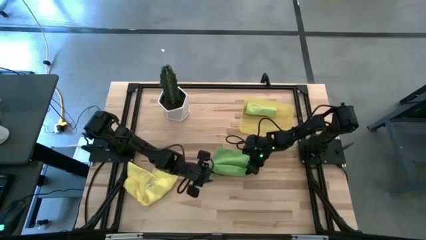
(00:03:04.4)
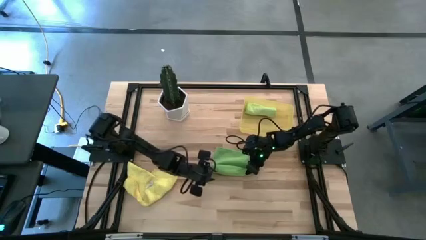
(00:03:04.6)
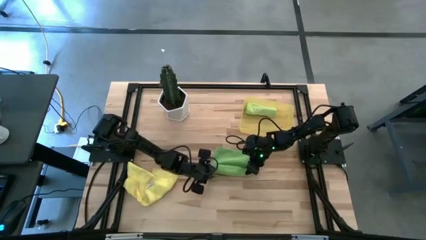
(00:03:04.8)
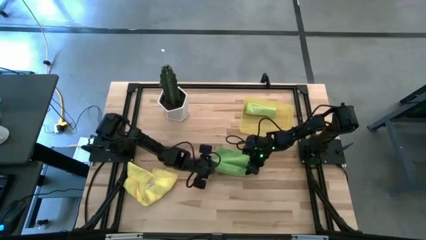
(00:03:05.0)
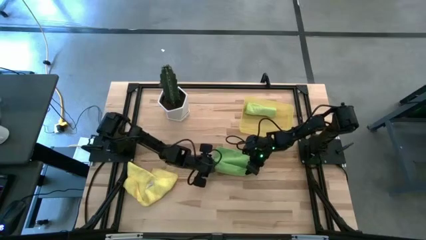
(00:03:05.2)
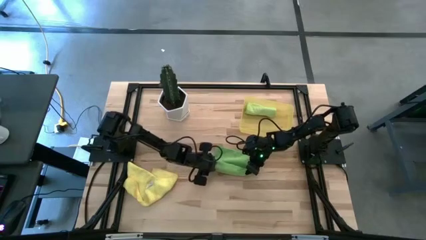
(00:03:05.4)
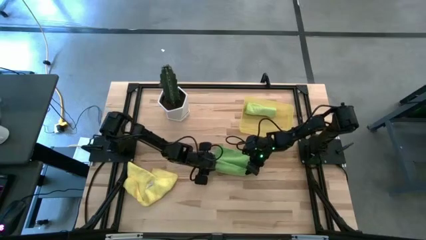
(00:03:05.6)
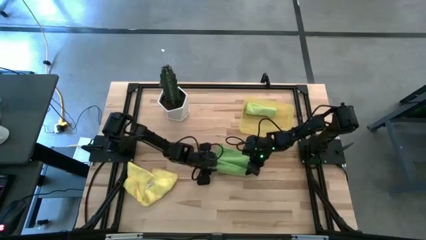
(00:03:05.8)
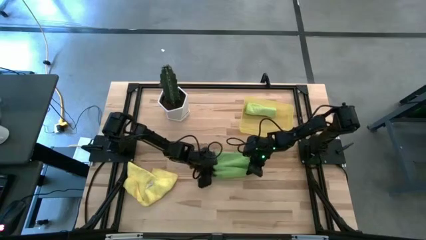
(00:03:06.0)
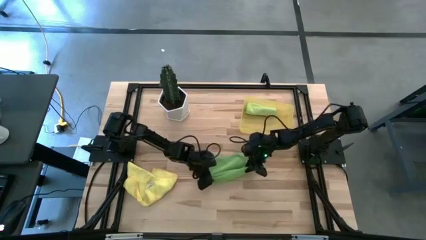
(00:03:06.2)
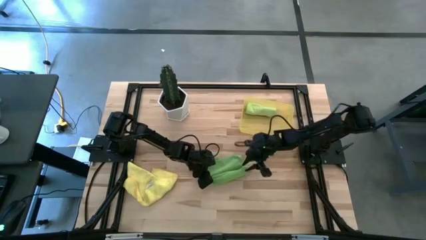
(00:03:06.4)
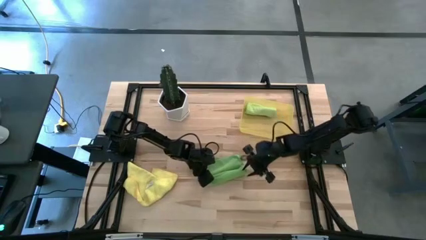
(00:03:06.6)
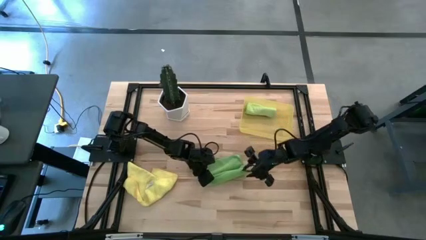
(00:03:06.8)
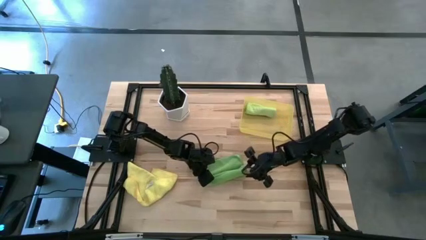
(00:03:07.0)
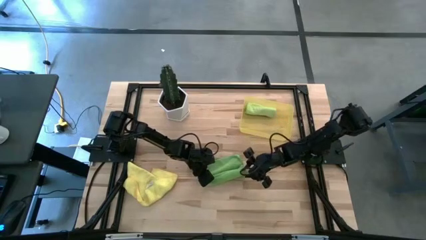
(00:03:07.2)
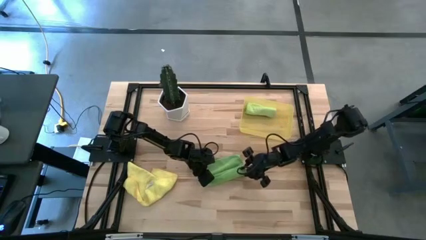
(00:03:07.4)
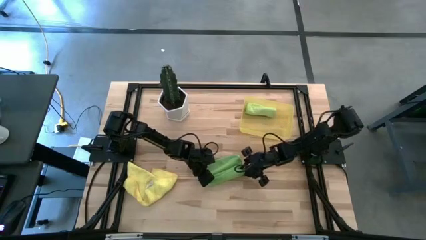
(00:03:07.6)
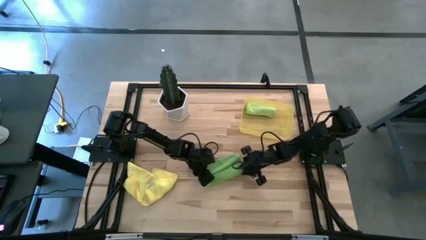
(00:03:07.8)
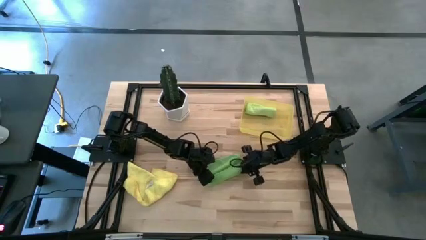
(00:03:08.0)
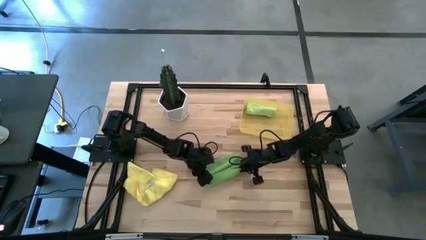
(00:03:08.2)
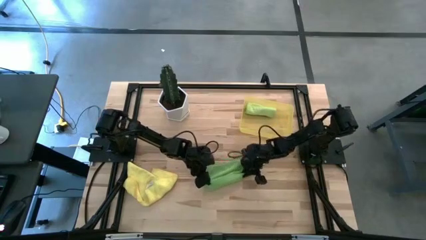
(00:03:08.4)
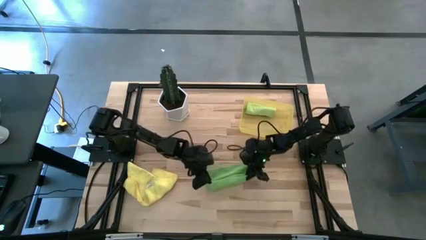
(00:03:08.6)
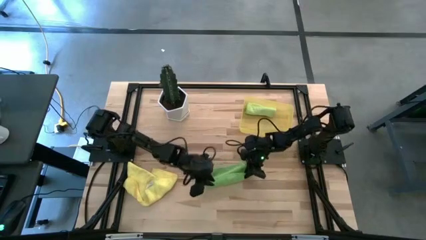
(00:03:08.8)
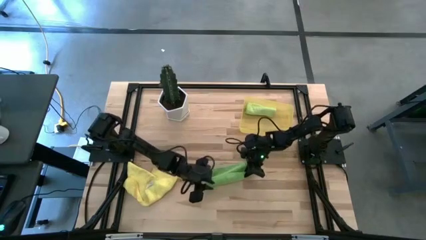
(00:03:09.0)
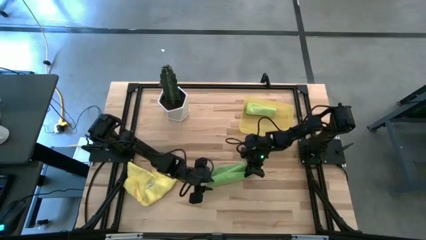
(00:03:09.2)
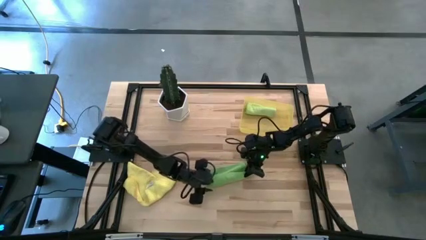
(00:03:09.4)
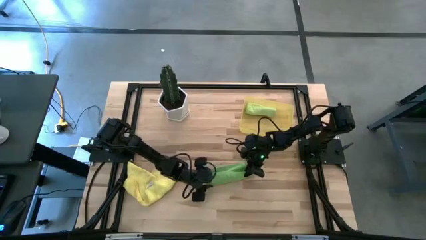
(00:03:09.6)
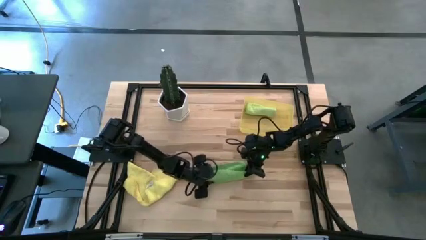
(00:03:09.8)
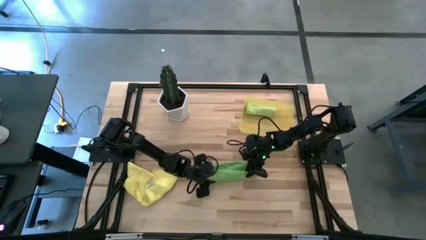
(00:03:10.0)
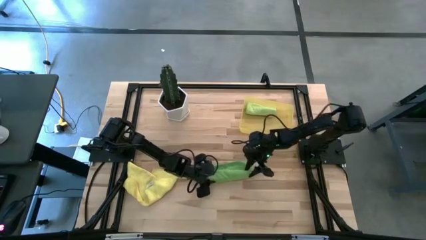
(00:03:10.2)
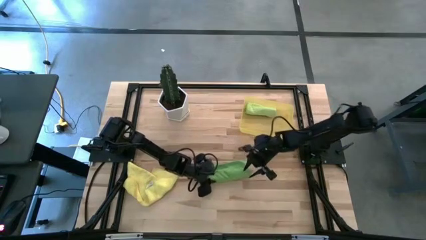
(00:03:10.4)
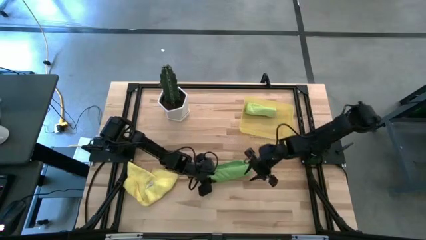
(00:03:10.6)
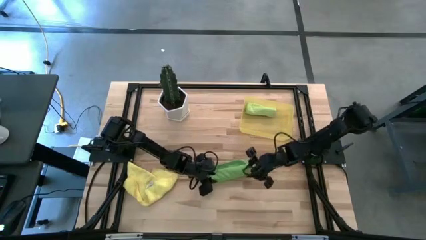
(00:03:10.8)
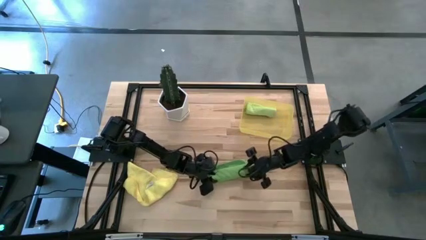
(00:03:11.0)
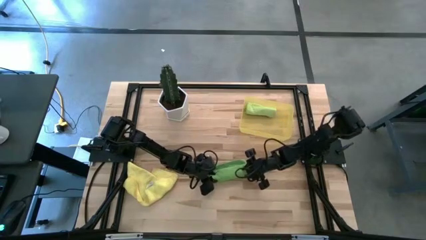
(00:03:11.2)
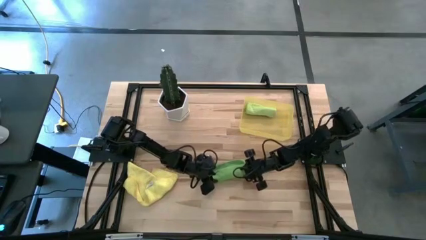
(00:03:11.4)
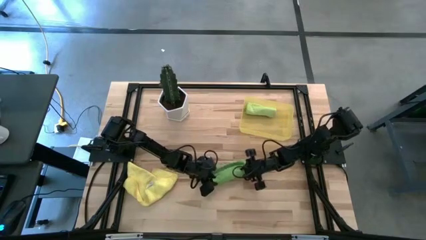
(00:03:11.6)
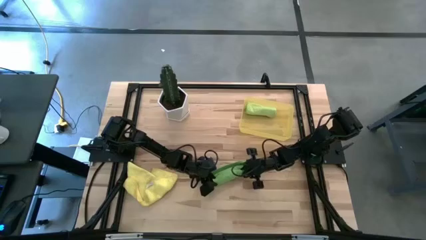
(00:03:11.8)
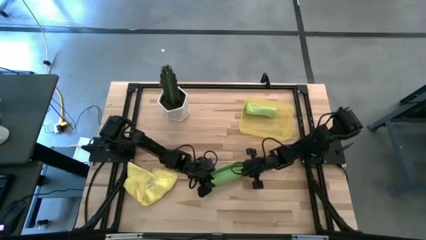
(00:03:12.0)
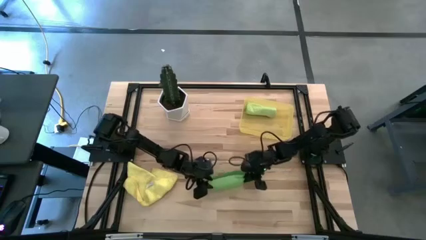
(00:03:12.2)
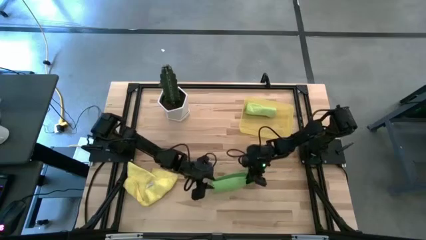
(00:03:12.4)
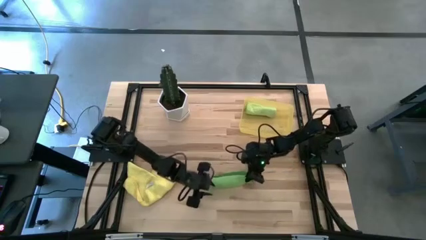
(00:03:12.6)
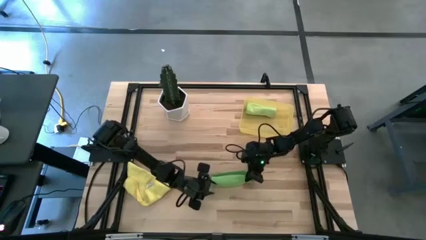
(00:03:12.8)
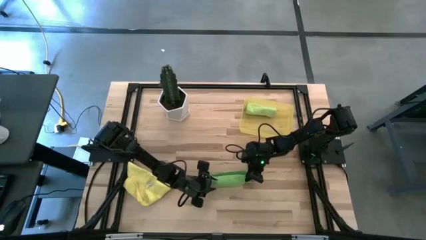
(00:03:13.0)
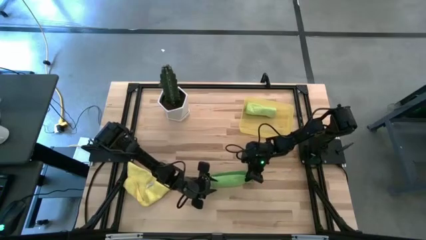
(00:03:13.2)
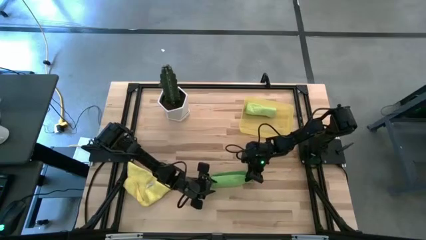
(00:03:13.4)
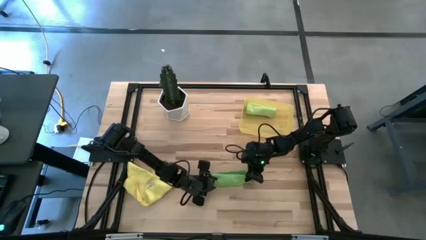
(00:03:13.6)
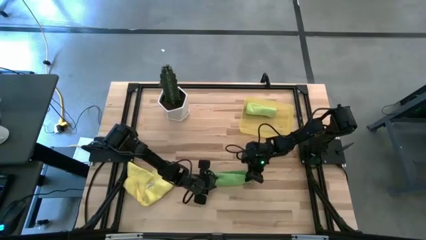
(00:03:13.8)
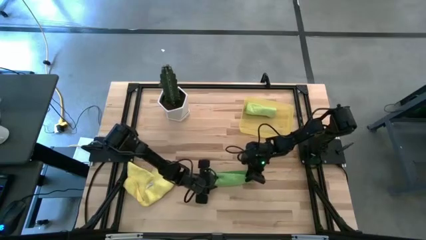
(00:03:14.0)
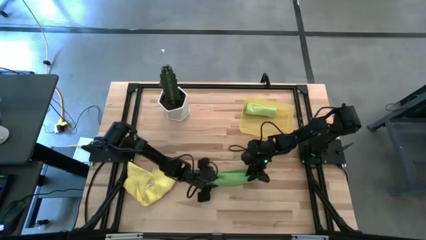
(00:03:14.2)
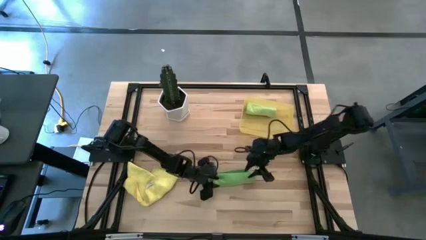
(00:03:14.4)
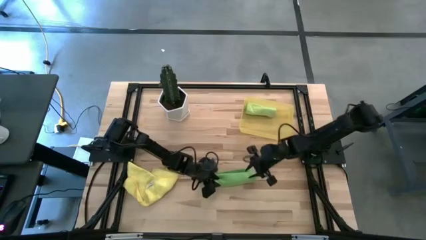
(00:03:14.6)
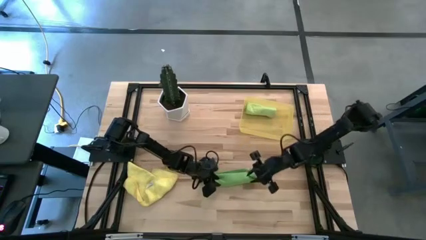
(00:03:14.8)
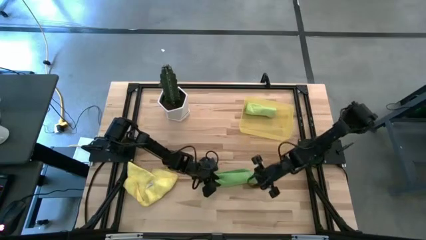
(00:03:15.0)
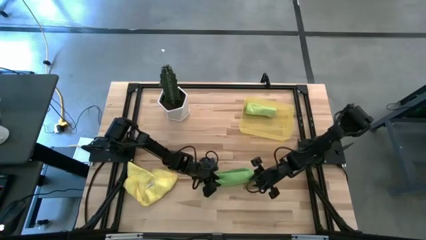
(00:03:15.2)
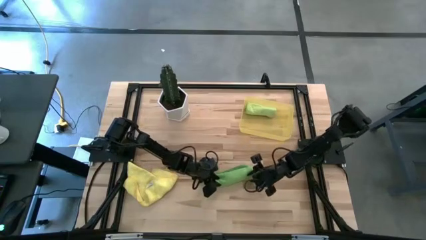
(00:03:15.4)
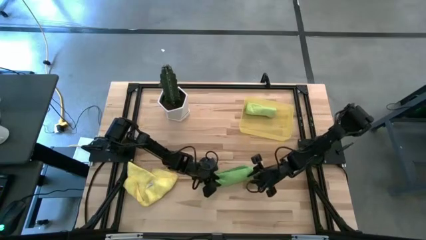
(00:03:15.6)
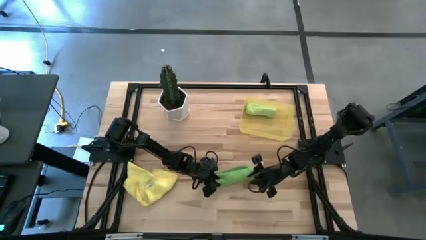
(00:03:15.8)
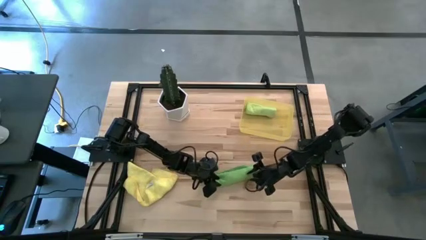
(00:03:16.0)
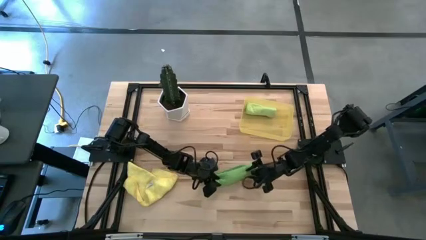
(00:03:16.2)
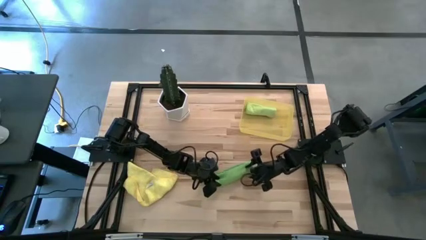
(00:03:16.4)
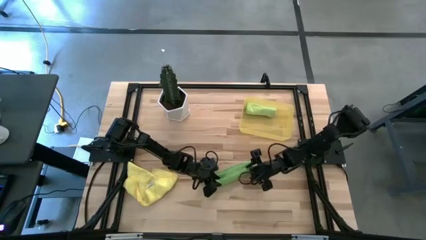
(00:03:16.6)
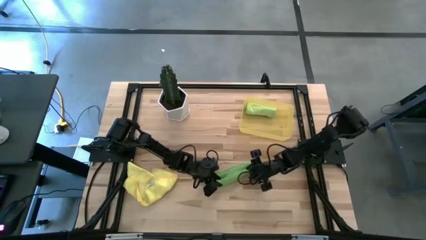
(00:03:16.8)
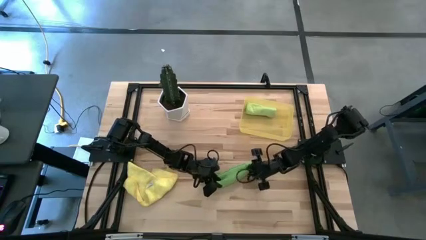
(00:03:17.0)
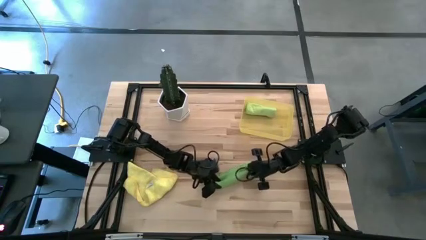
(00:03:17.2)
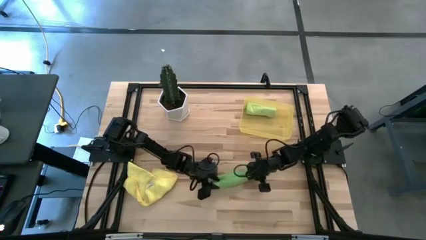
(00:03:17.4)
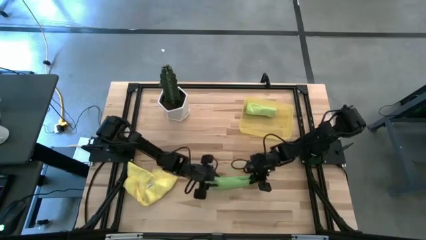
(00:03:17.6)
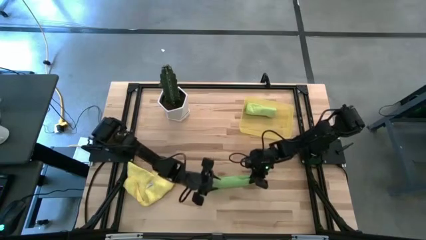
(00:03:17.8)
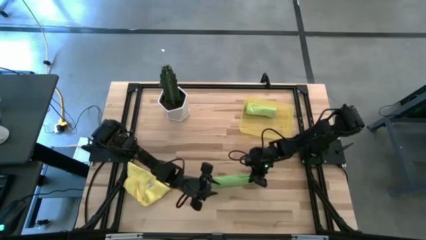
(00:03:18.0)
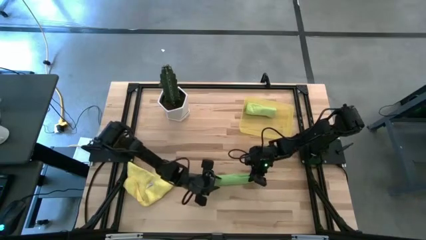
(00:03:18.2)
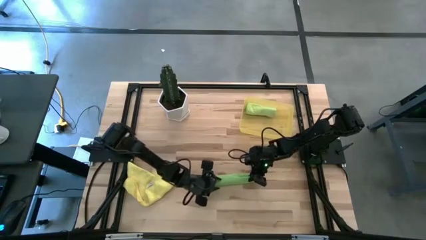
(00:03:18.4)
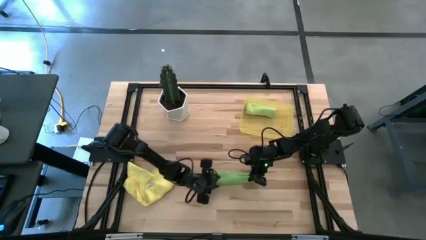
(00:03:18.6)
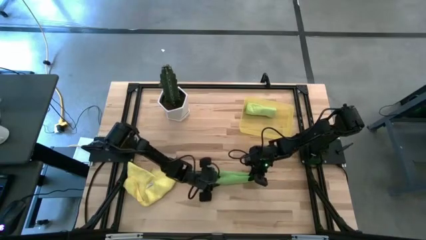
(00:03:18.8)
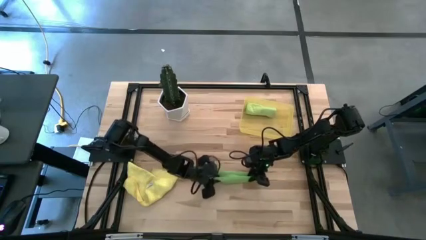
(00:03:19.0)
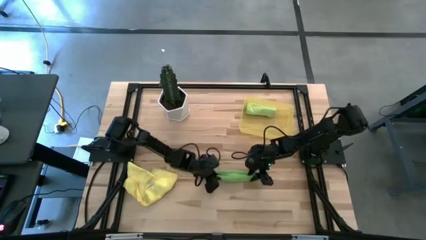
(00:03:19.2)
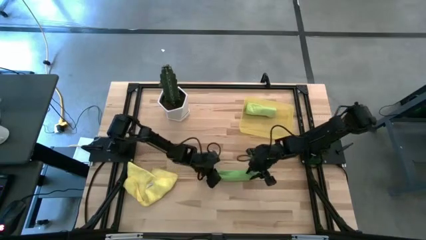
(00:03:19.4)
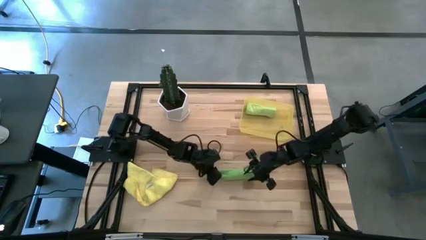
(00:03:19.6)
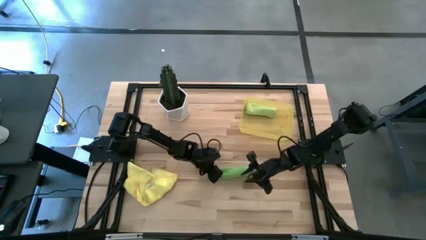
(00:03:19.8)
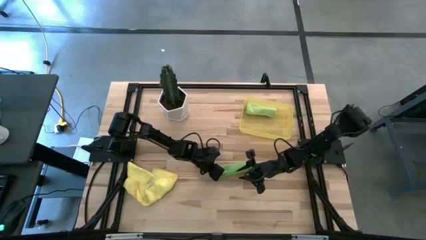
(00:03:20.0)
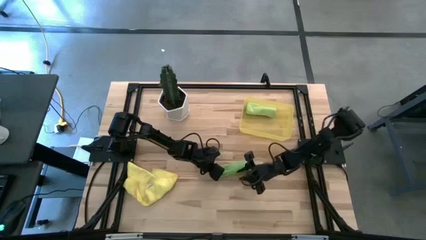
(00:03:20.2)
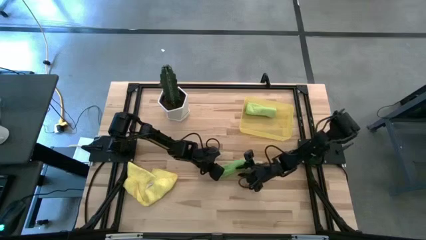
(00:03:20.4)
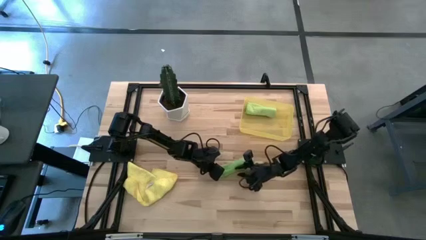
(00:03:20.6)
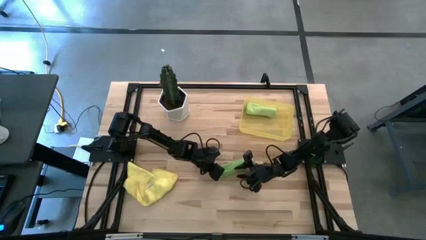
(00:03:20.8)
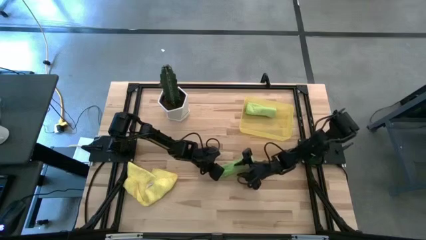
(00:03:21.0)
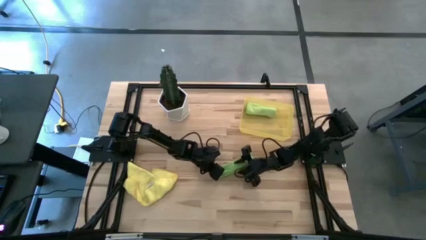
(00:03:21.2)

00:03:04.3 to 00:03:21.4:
Task: Roll microfiber towels into tight, uniform cylinder then place into a basket
Roll the green microfiber cloth
